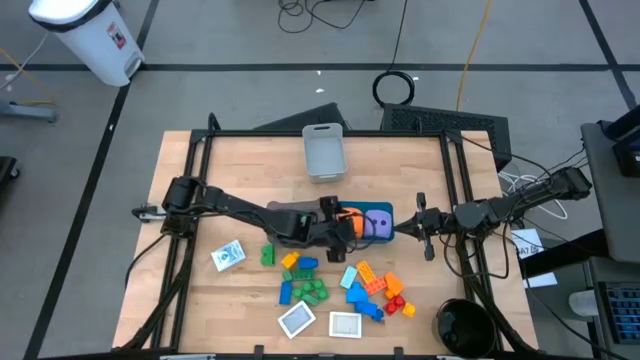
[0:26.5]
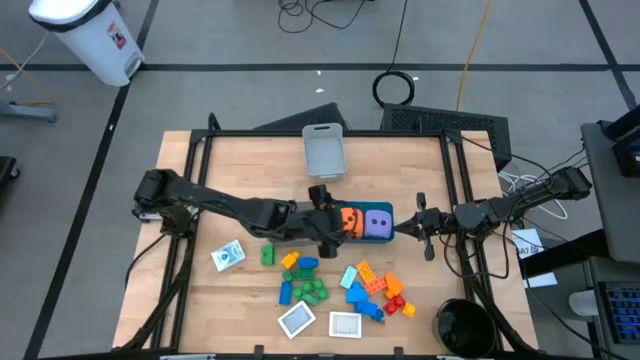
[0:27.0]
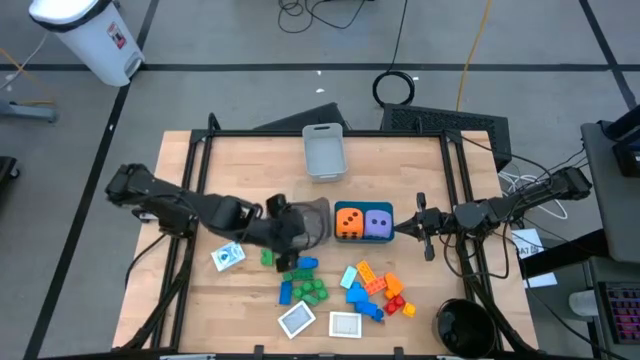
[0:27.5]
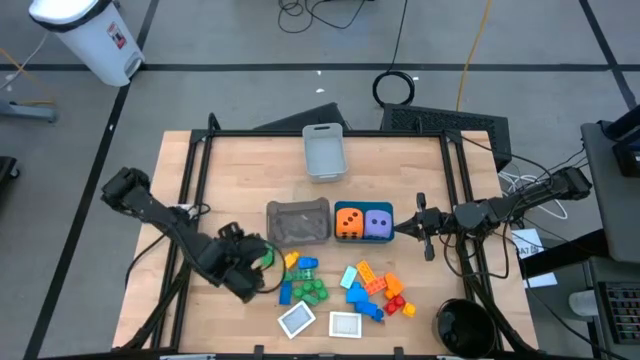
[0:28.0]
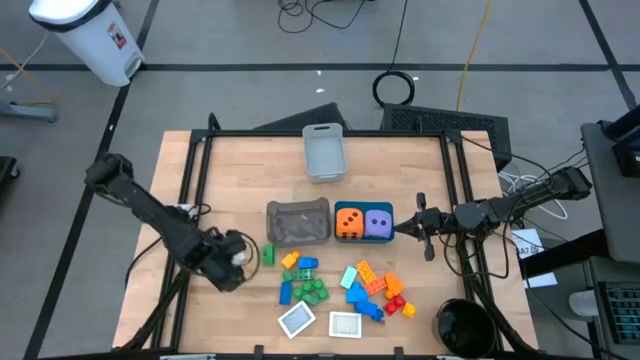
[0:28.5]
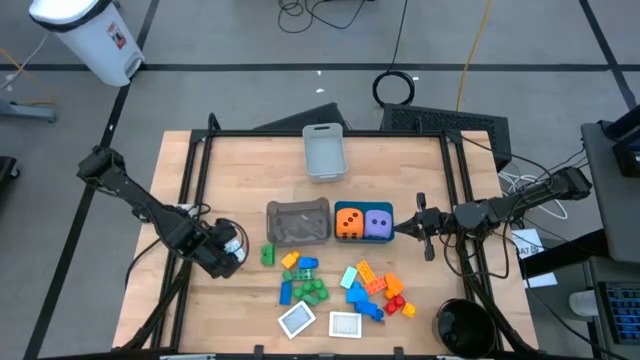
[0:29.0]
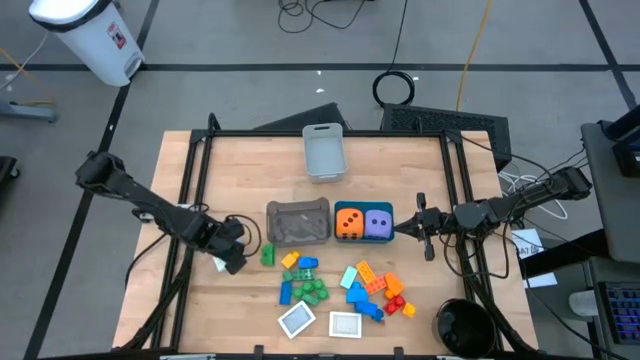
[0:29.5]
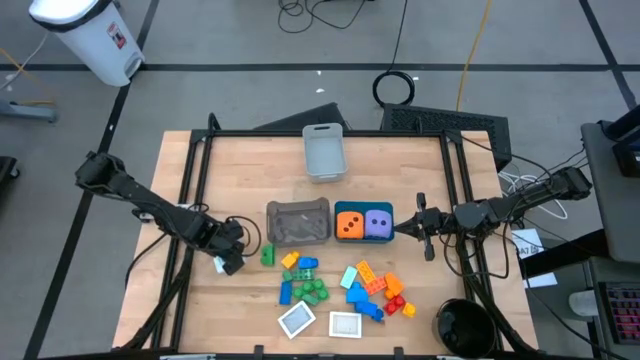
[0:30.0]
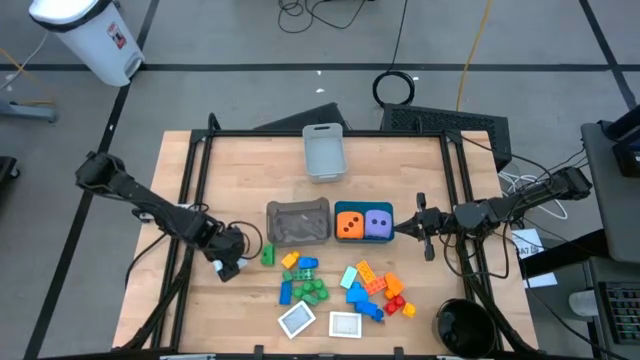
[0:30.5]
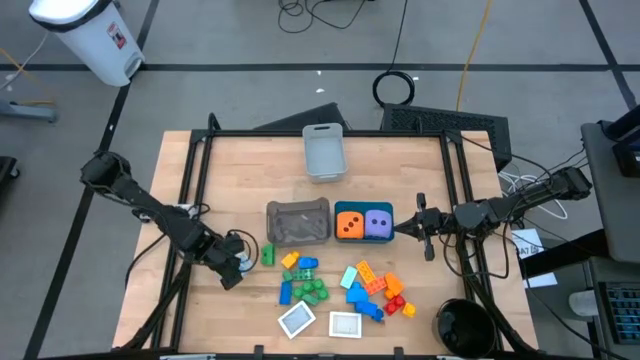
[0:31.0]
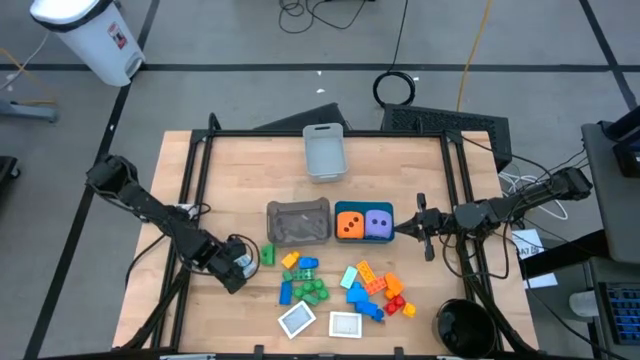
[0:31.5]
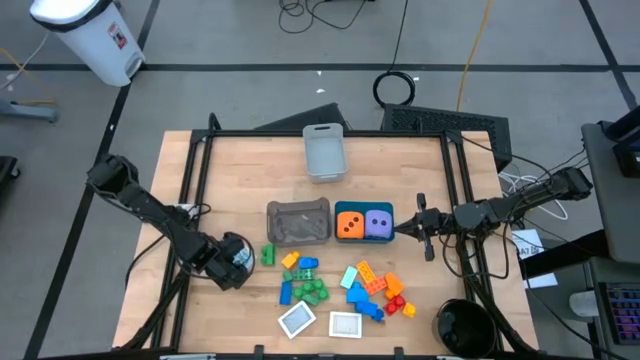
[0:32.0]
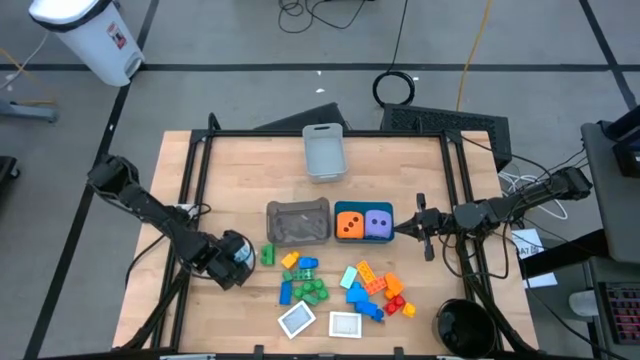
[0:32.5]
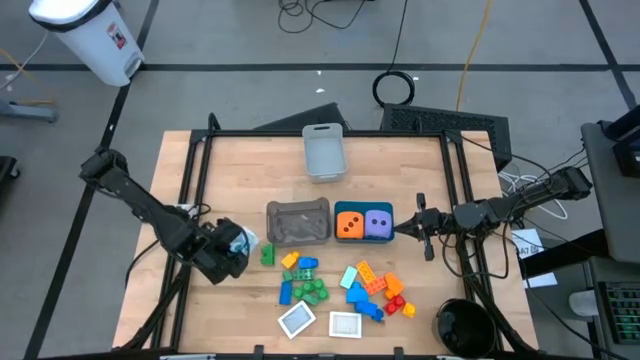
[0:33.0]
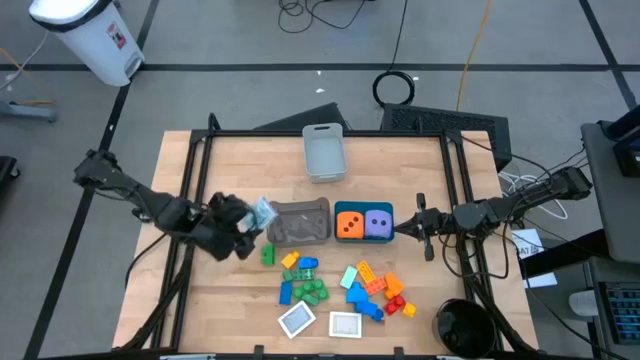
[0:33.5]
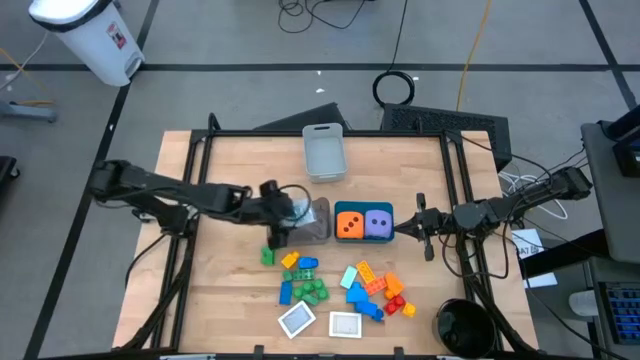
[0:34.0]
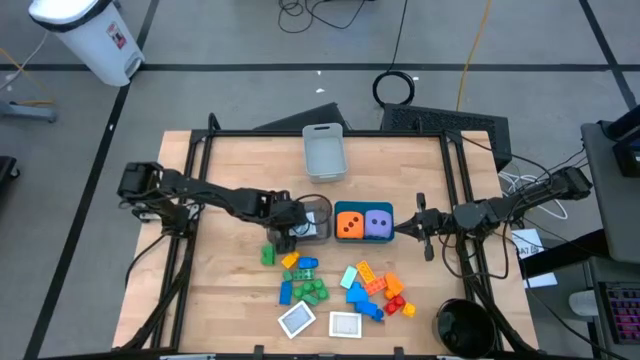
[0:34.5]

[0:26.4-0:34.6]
Task: Pick & Place Toys
Put the blue deck of cards into the black bin

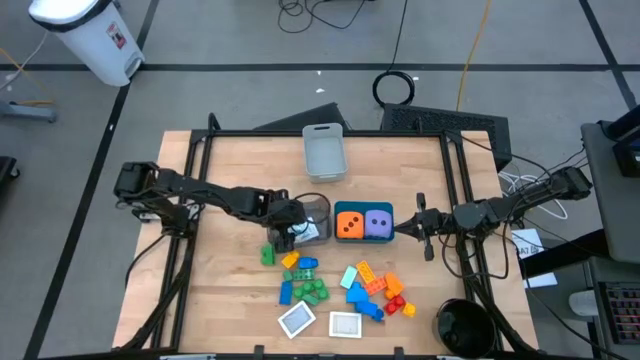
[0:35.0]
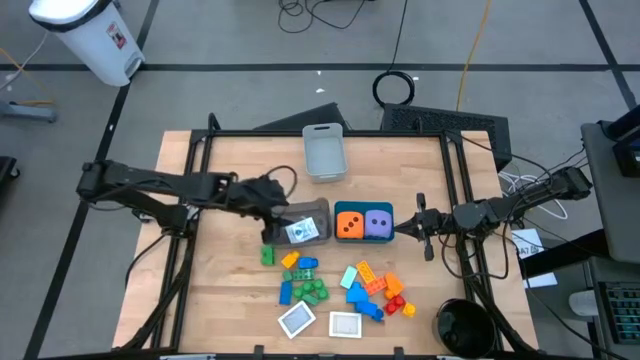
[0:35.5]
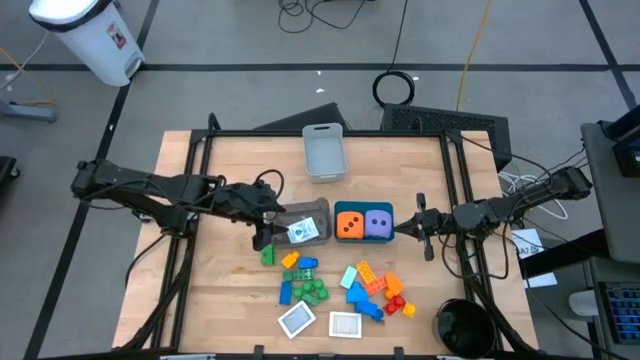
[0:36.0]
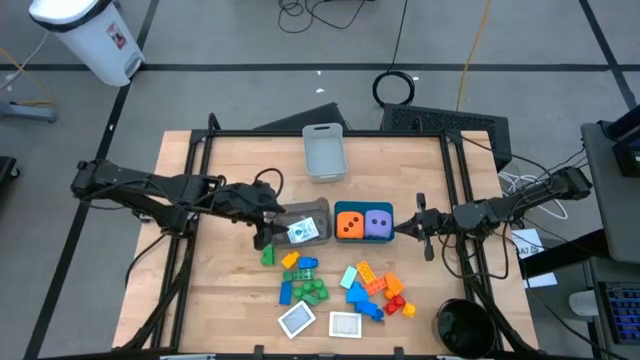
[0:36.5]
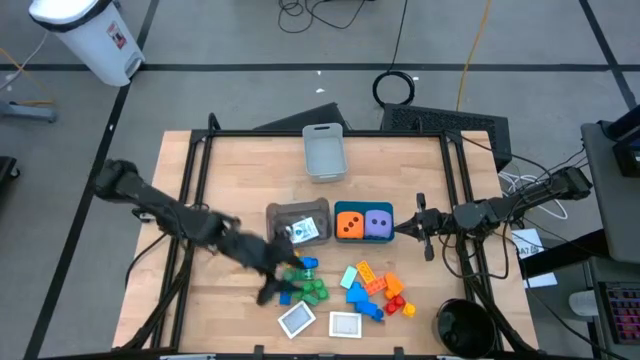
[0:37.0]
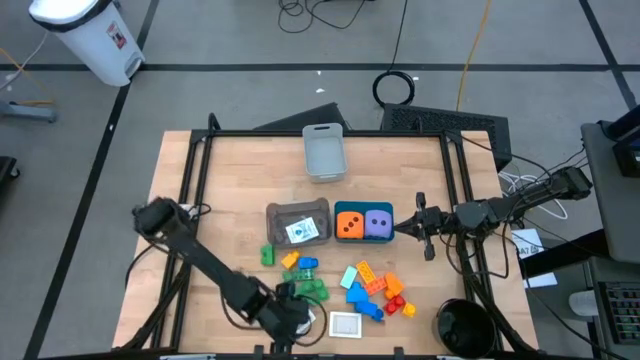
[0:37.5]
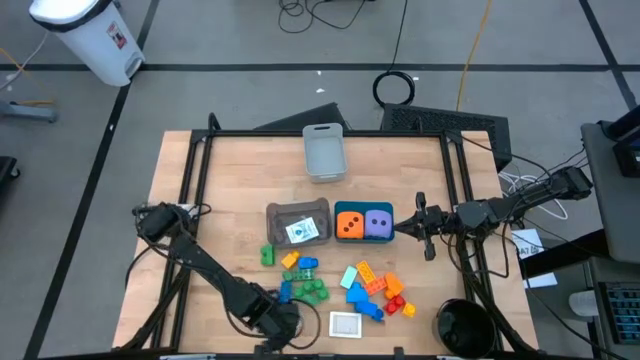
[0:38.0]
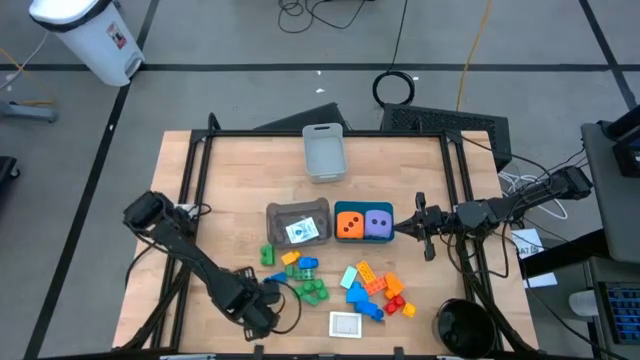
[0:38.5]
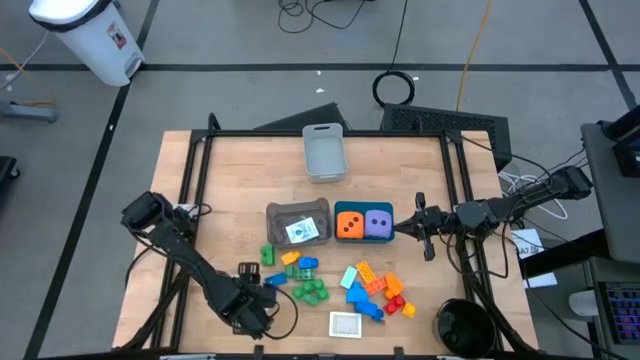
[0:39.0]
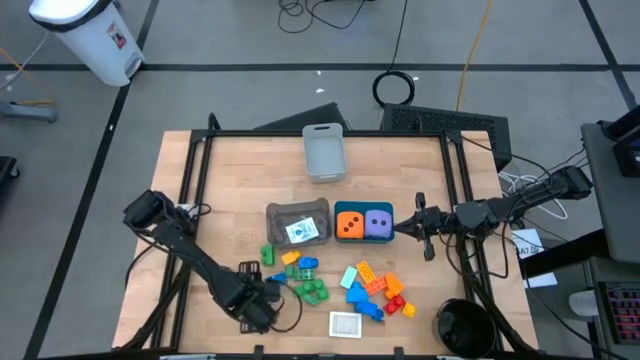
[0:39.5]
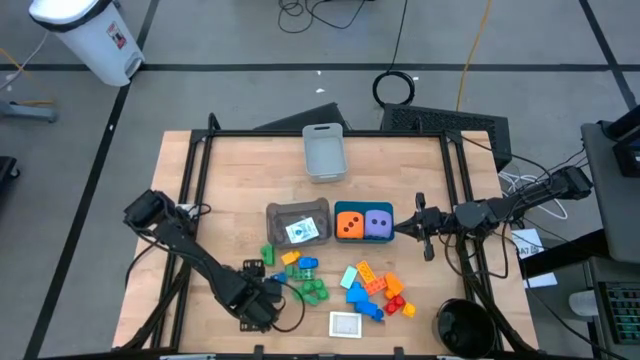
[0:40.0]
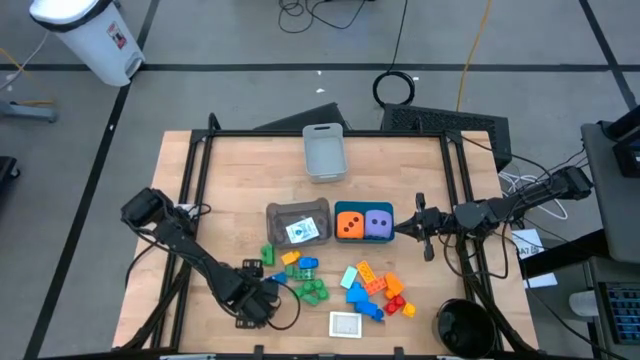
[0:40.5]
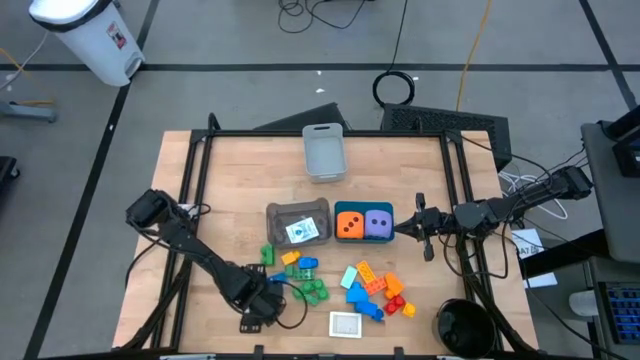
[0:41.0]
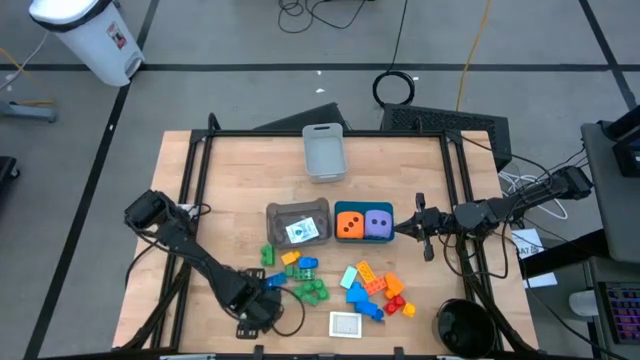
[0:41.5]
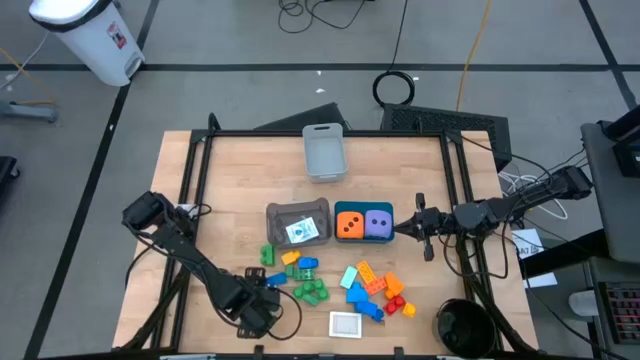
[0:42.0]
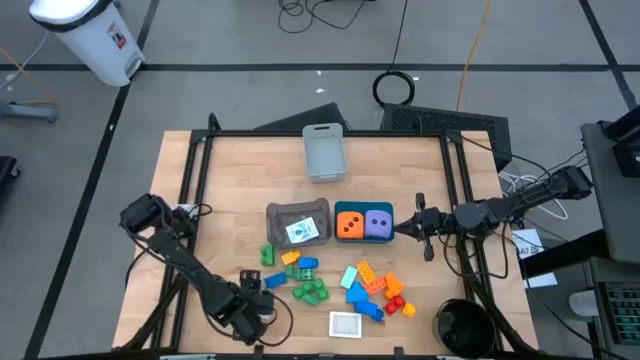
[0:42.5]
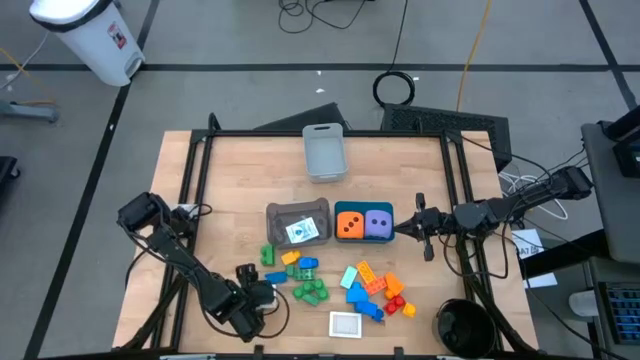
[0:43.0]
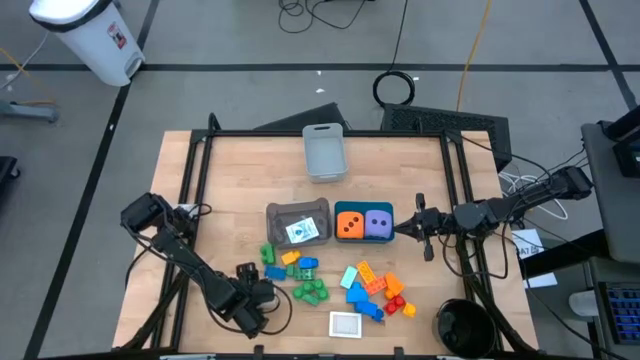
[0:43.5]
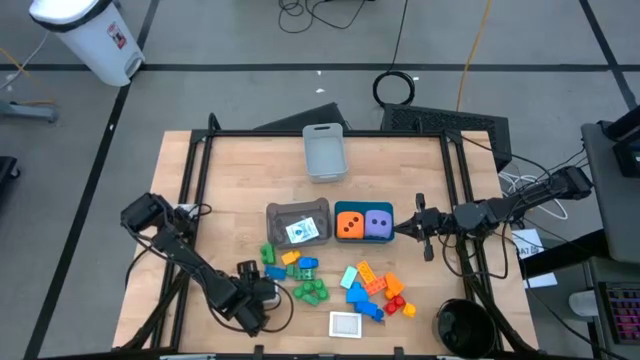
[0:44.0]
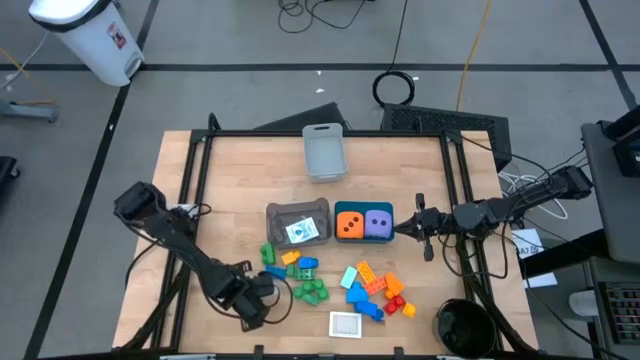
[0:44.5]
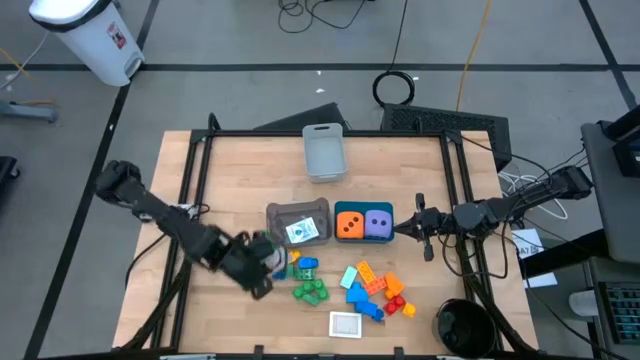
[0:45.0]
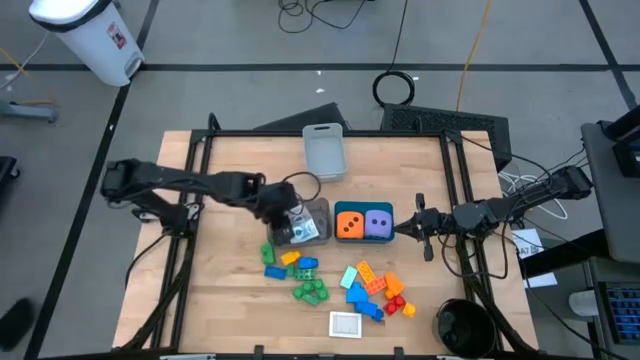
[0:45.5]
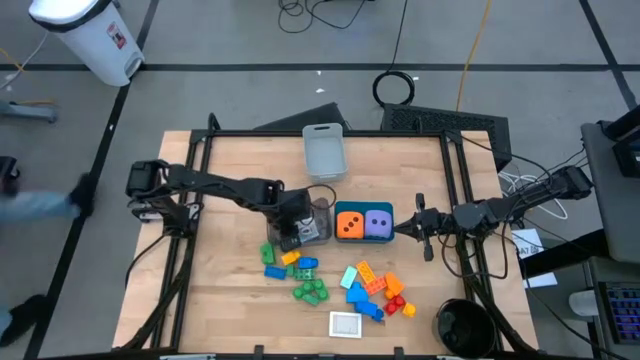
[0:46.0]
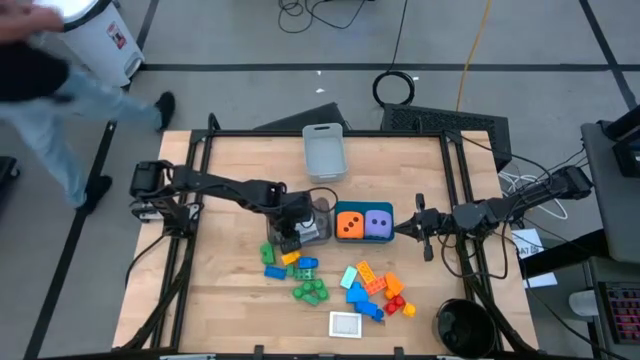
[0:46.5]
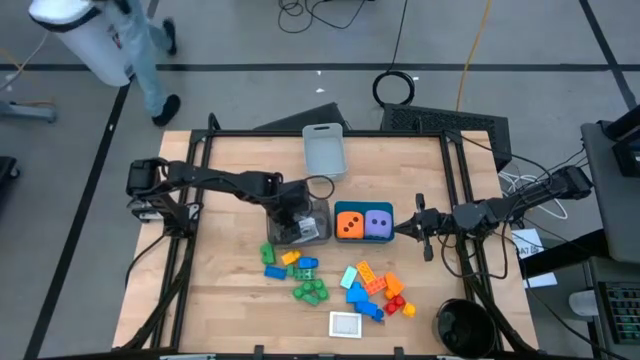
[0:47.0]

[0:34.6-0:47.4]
Put the black deck of cards into the black bin
